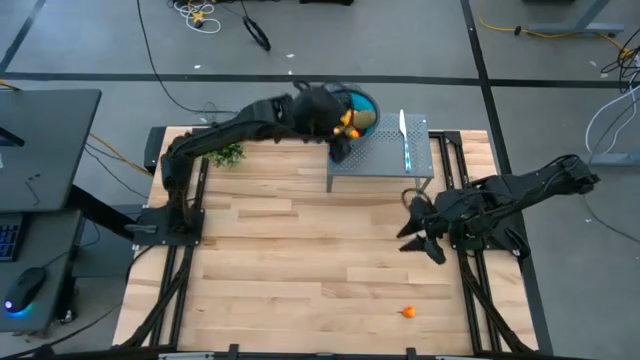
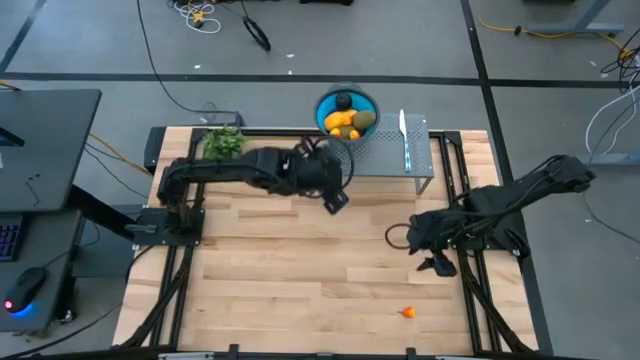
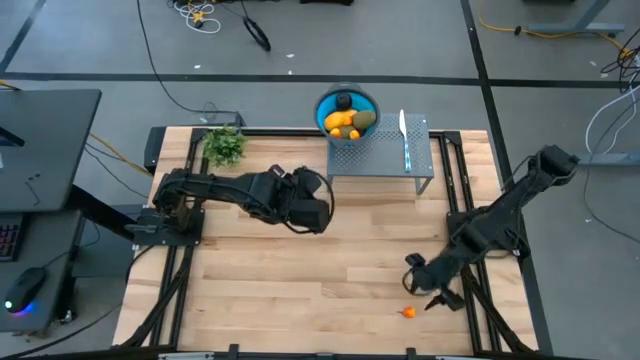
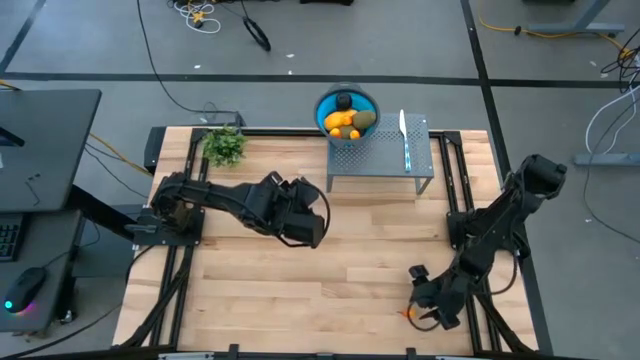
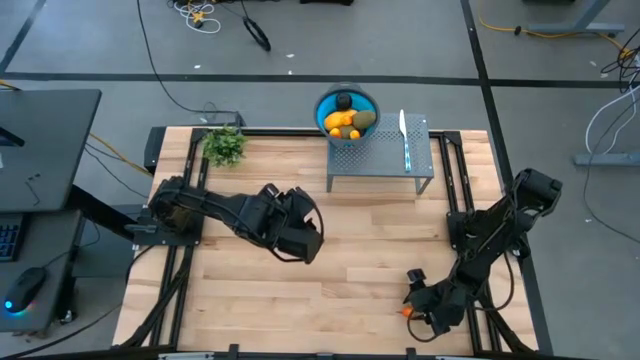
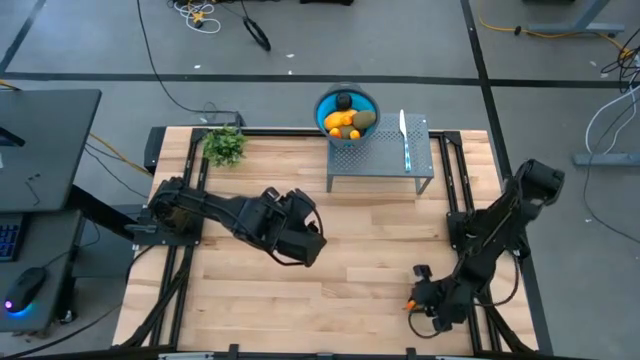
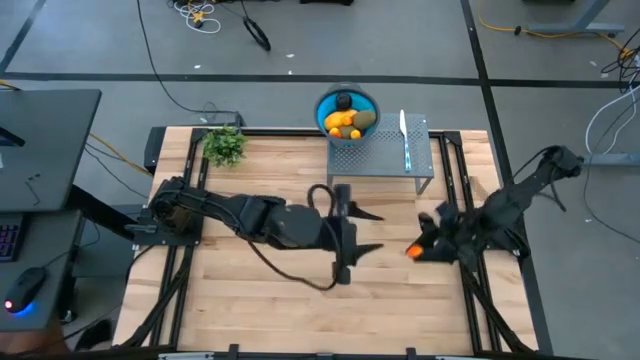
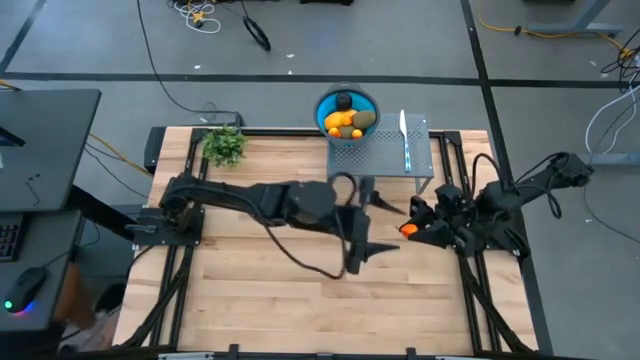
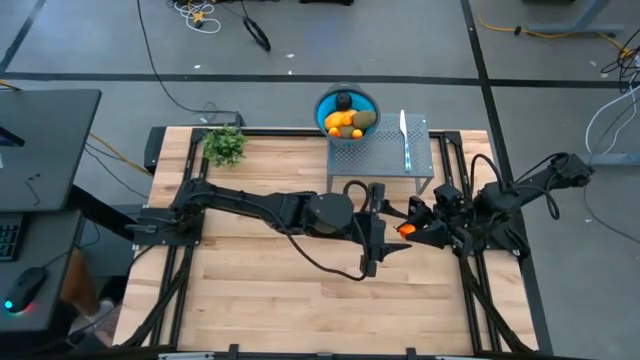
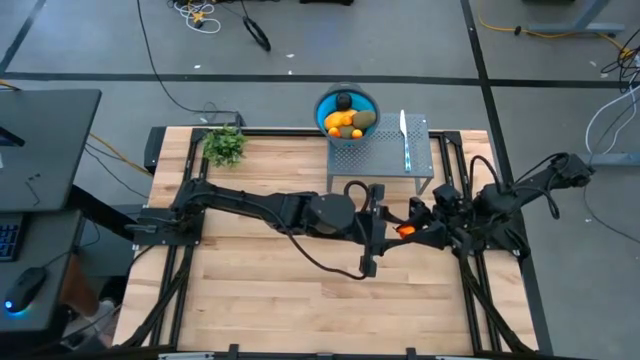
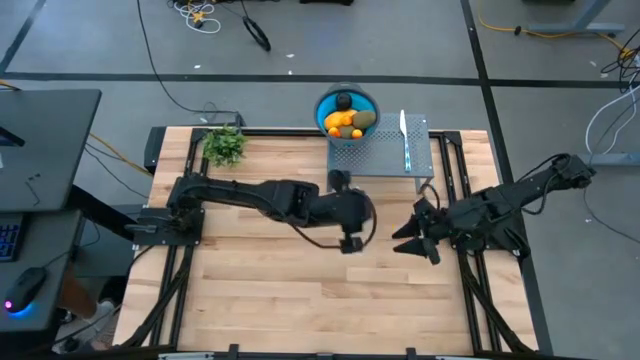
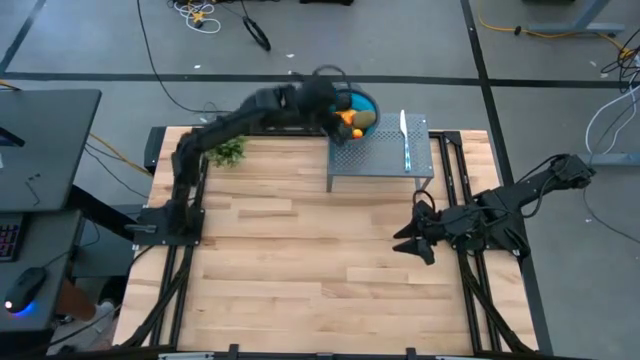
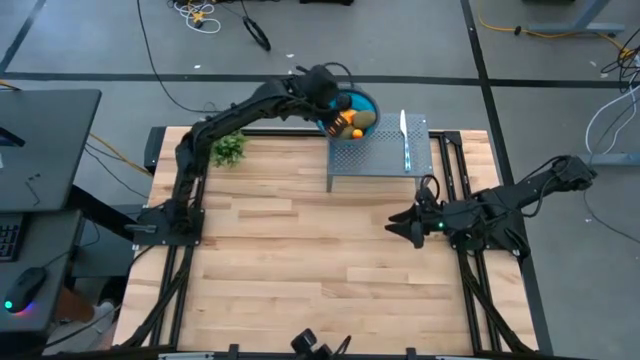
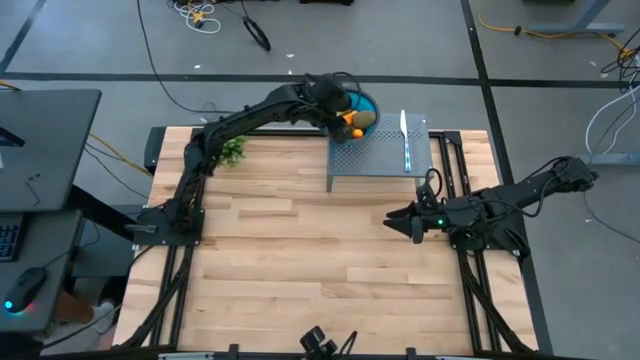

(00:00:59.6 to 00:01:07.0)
Task: Pick & Place Fruit
Put the pear into the strainer bowl

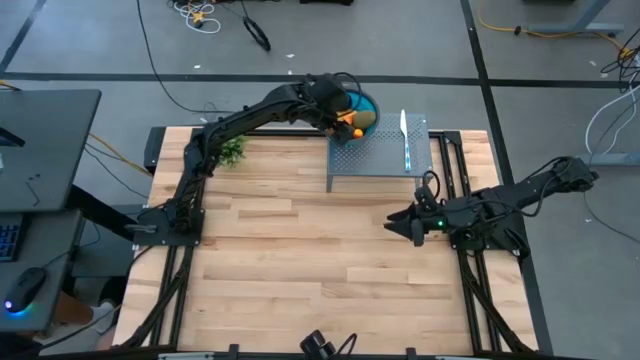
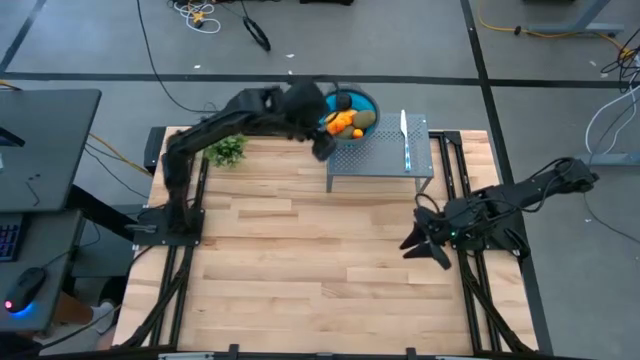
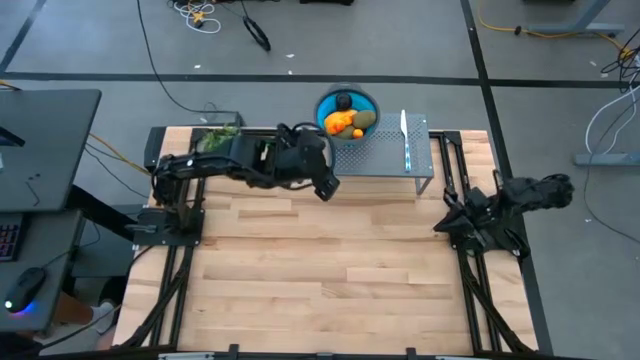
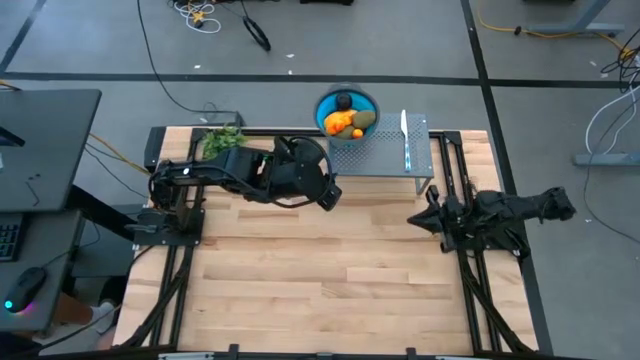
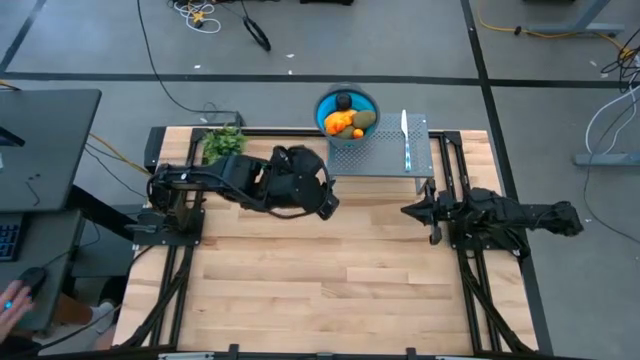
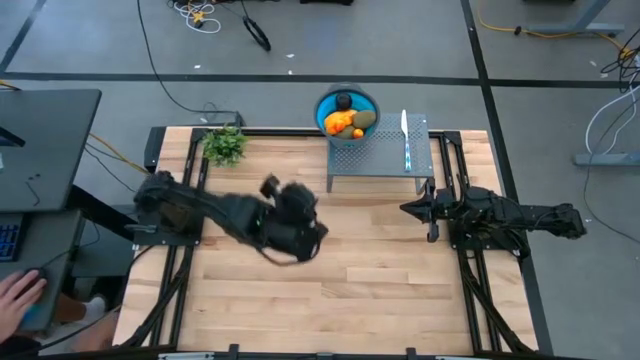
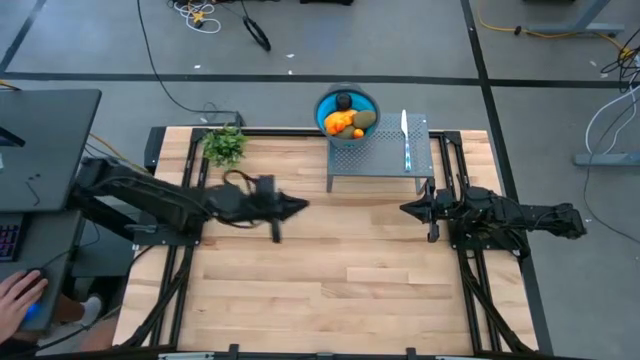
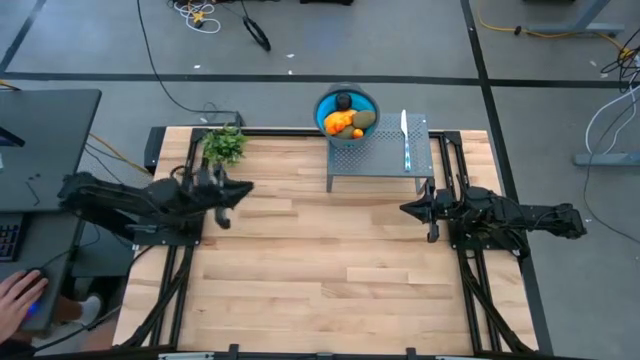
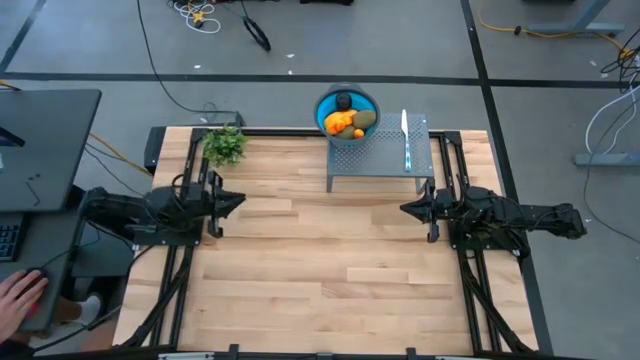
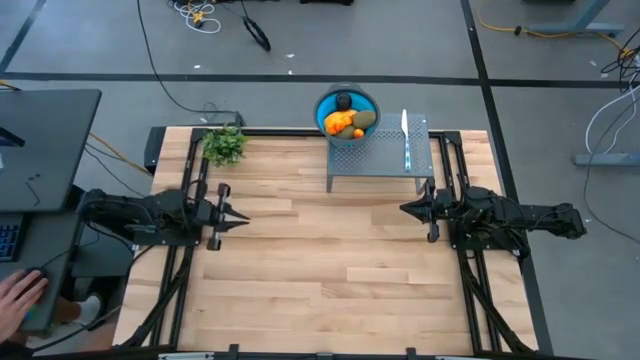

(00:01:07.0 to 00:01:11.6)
Return to Home Position

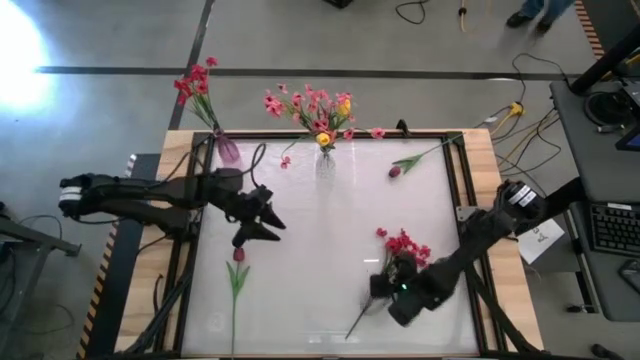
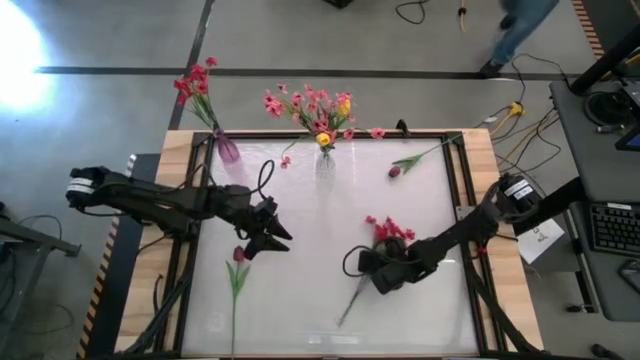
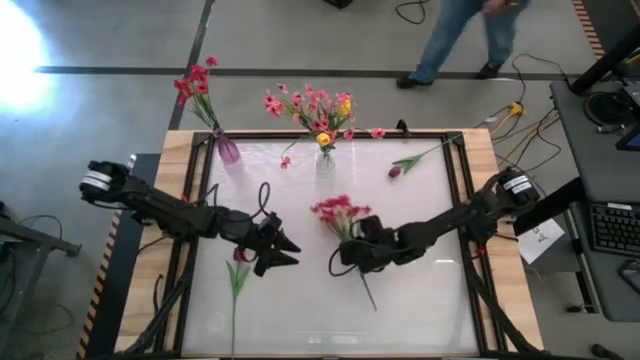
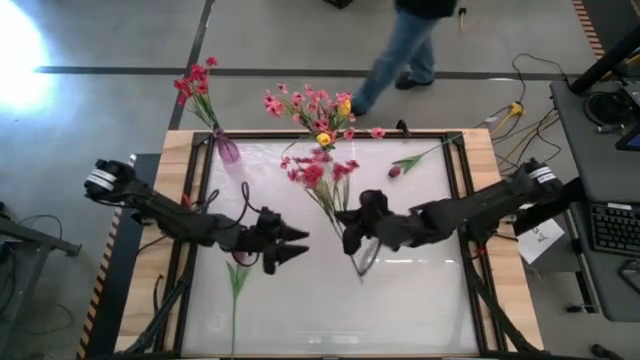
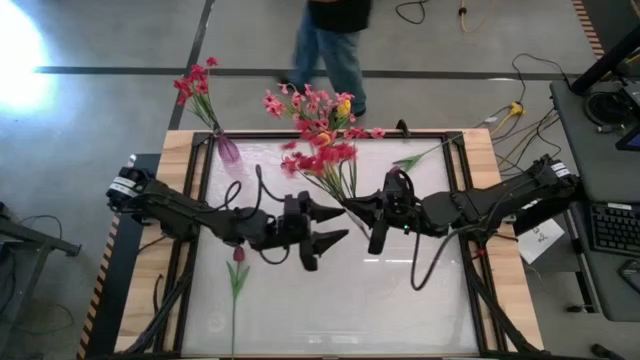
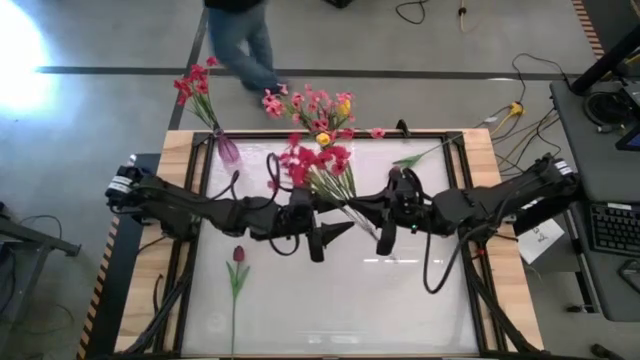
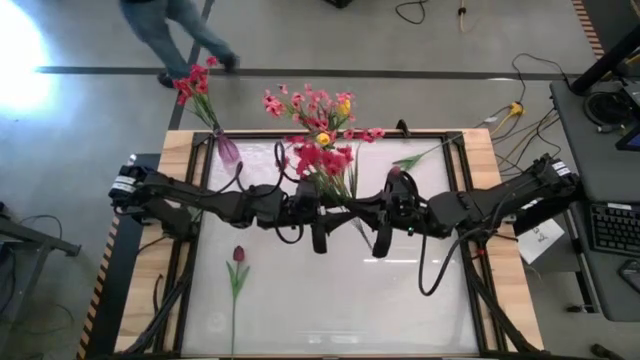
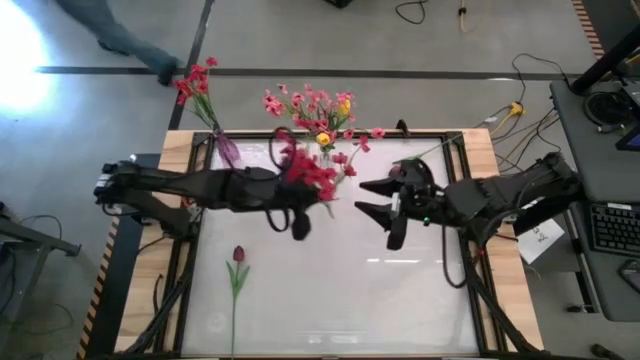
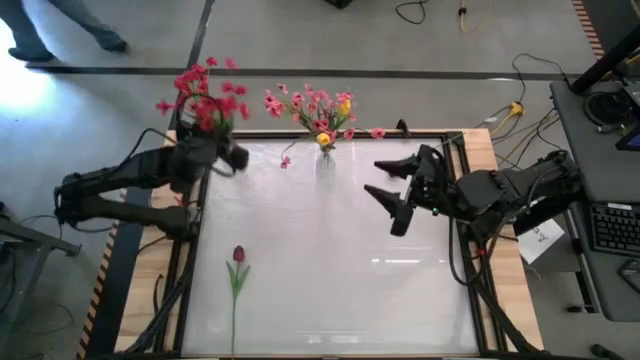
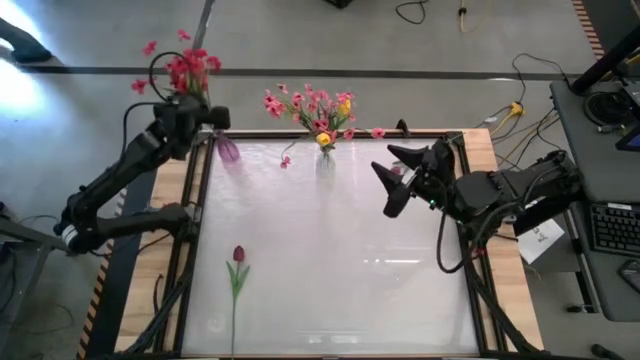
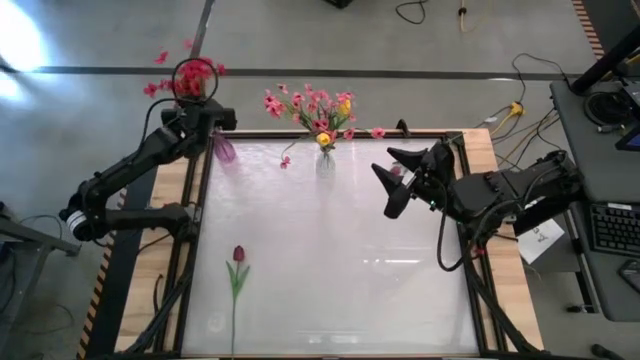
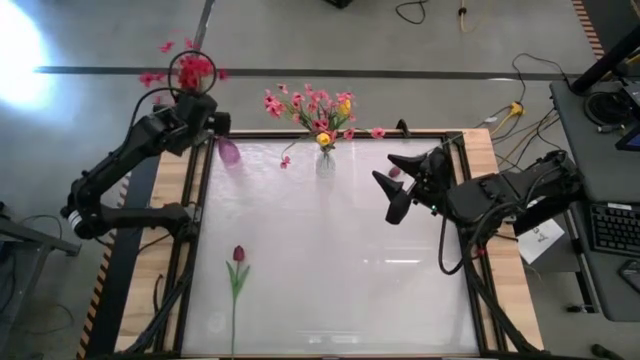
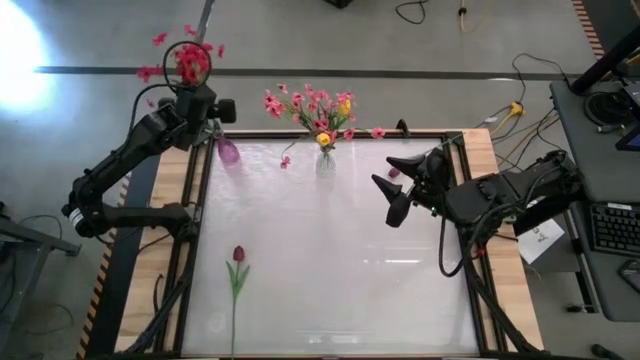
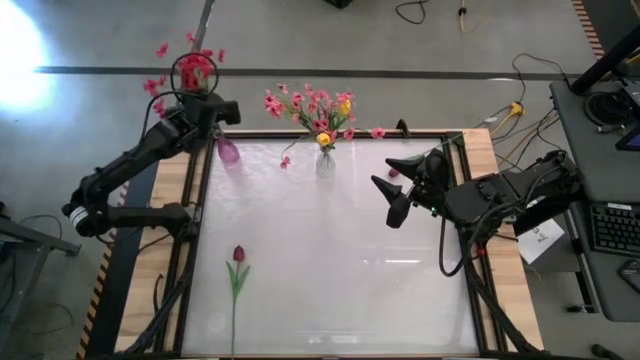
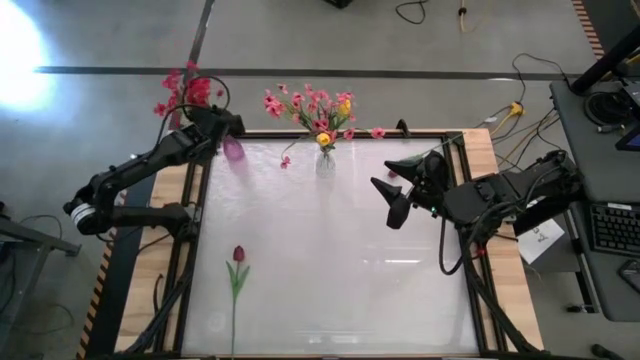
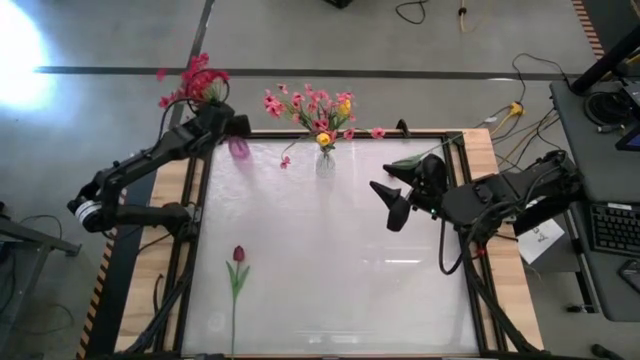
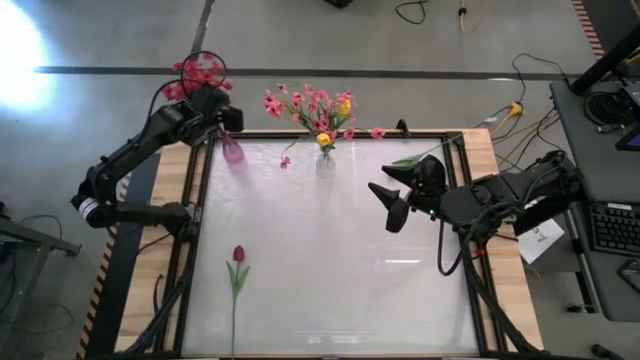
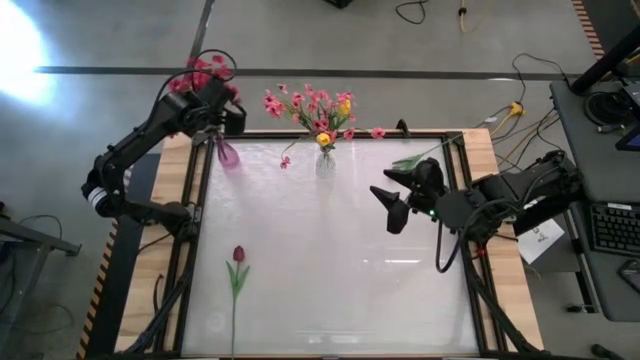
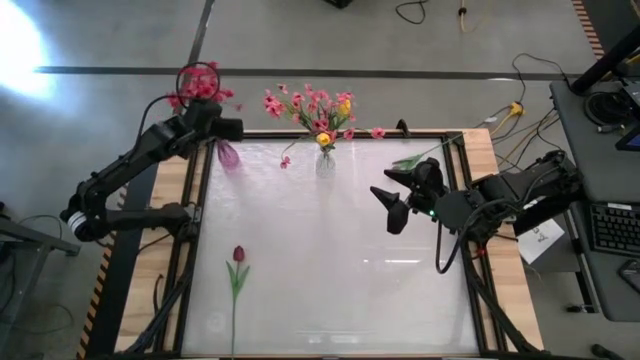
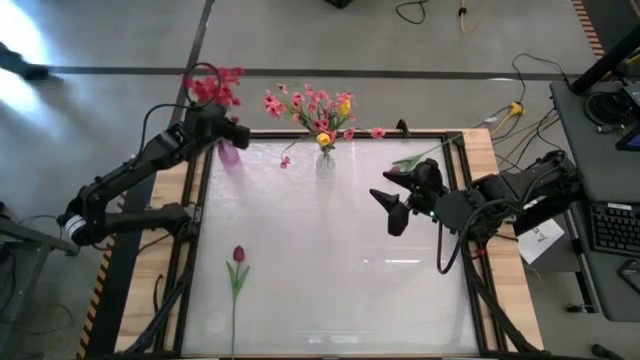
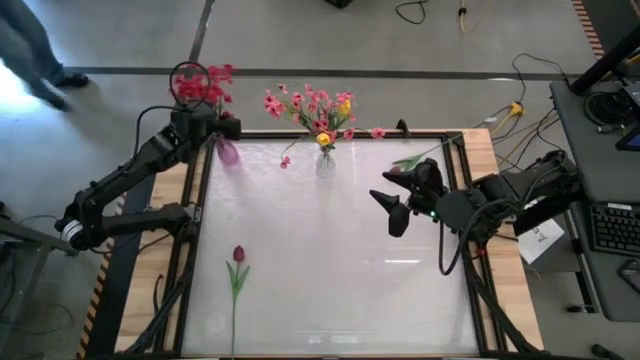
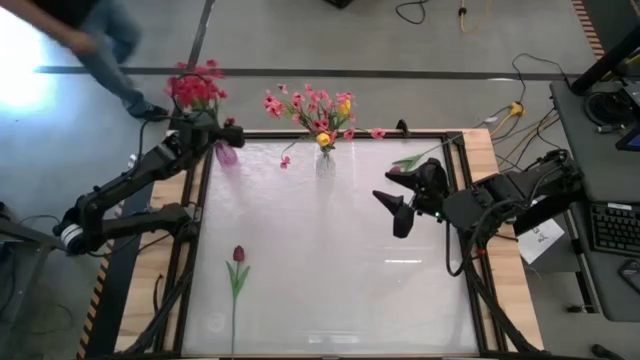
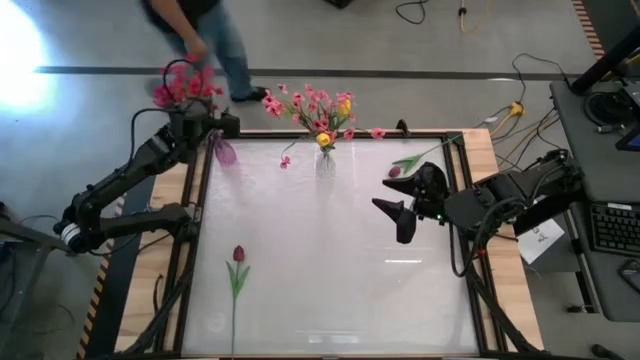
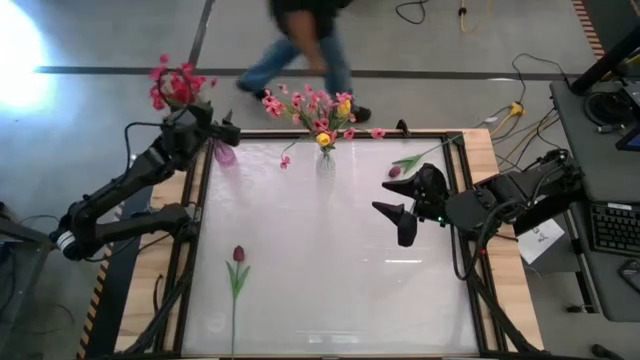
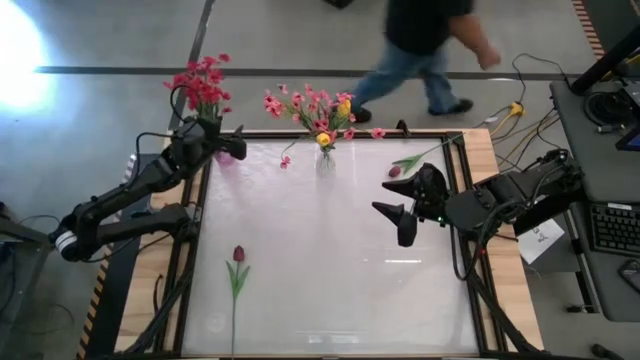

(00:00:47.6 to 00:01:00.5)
Task: Sort flowers into vase by color
Put the red flowers into the purple vase
